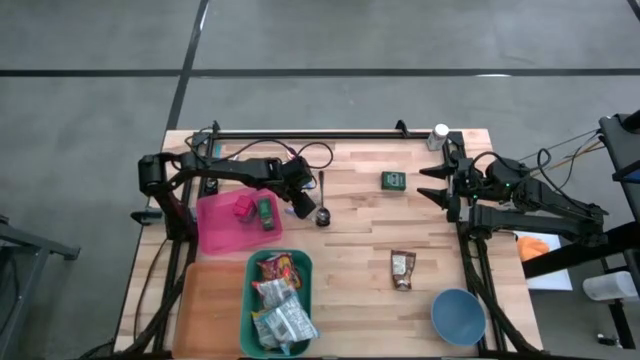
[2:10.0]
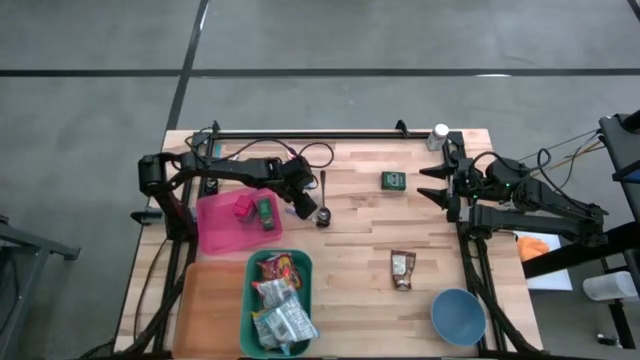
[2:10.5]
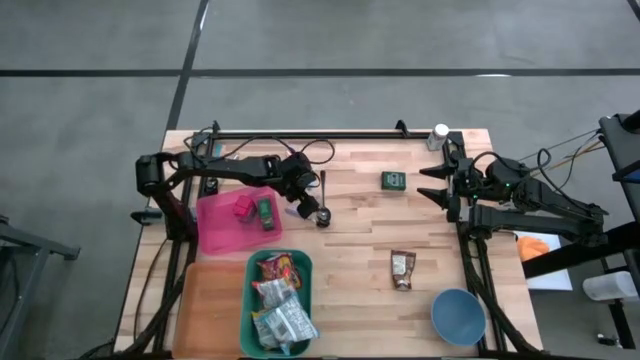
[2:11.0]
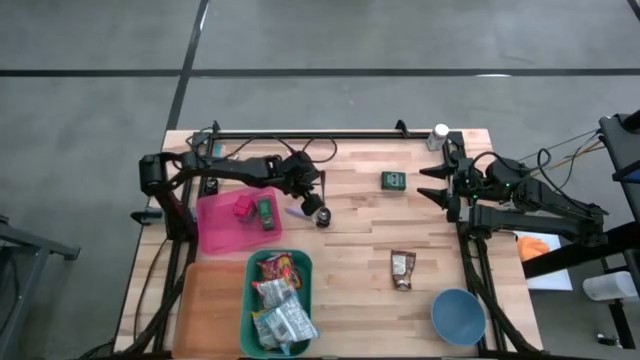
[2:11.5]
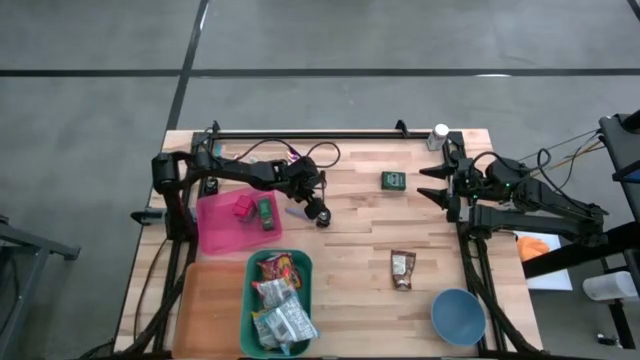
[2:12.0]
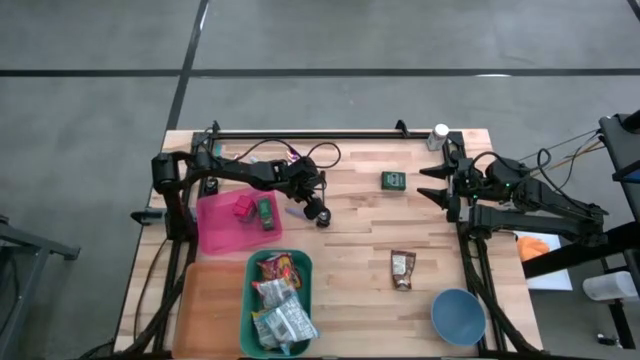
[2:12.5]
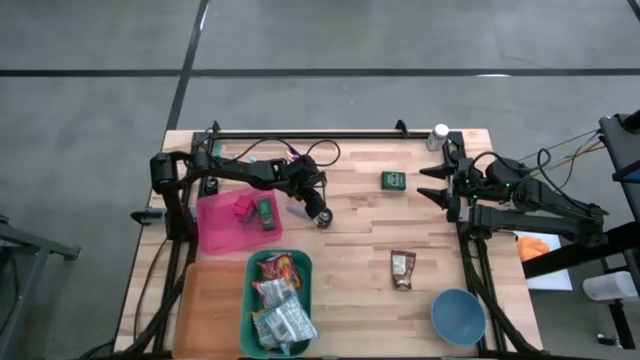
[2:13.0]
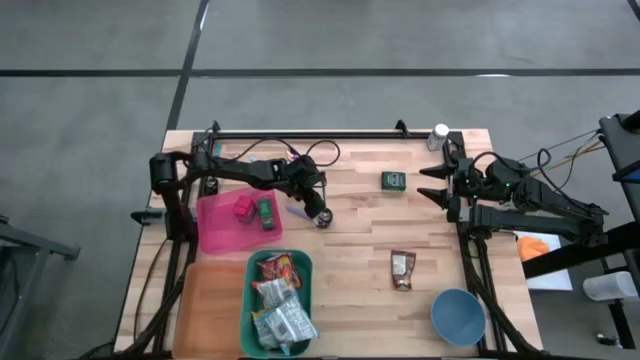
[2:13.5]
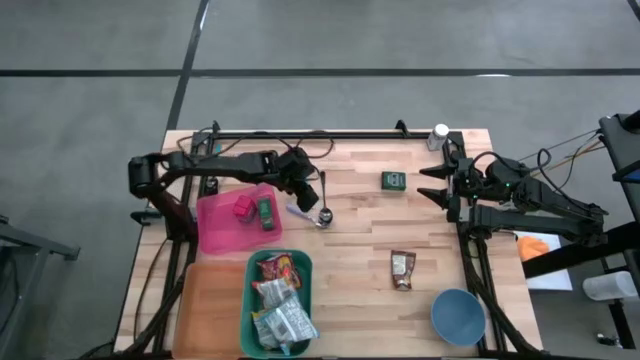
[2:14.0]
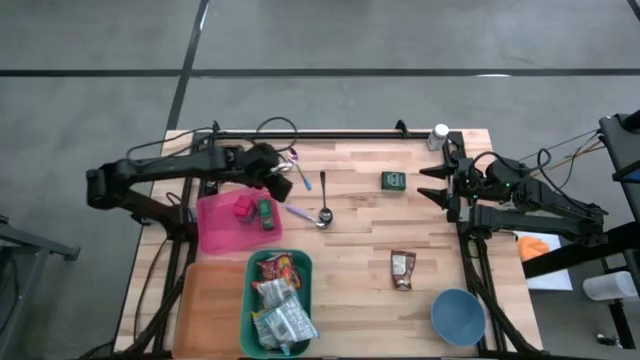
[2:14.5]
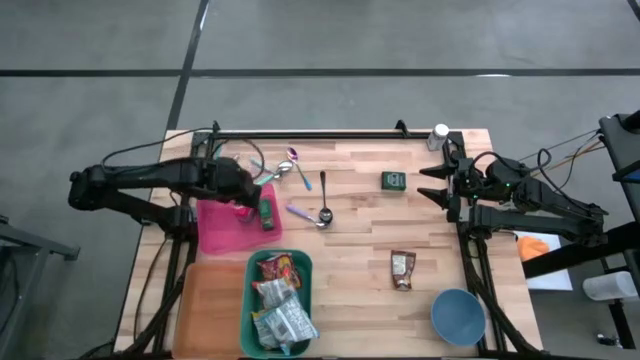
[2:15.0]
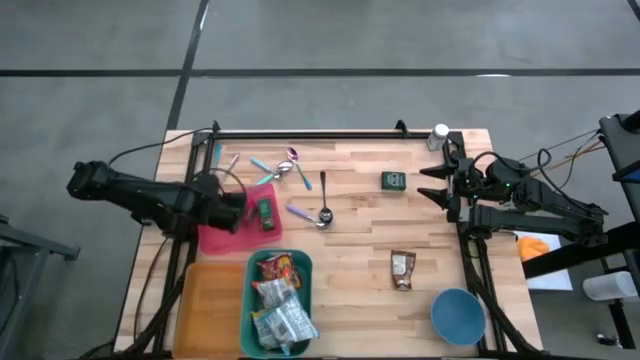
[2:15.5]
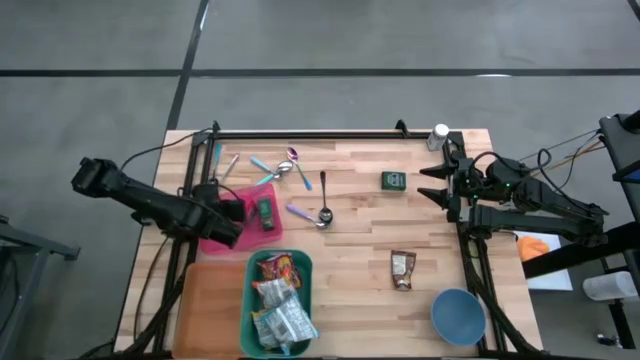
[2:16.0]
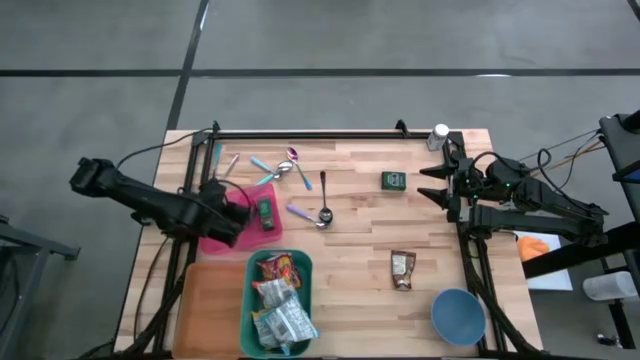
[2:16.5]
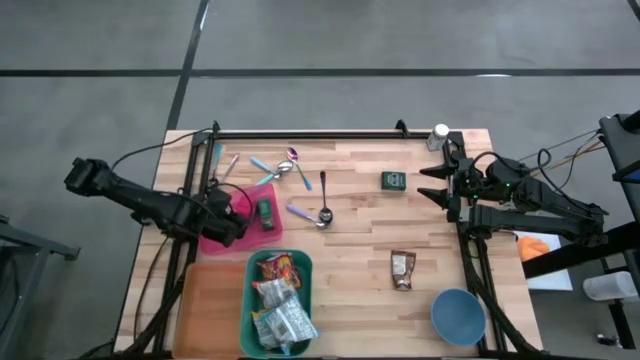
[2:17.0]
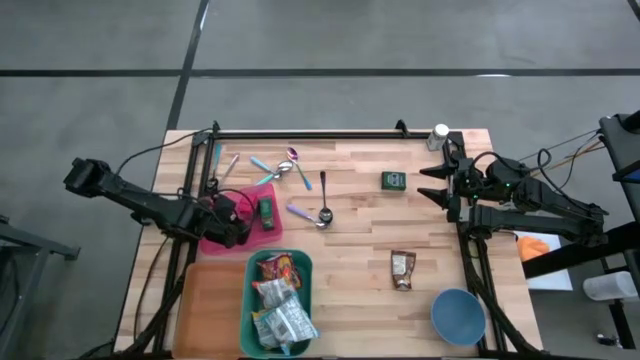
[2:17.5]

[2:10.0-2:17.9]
Put the brown seasoning bottle into the pink bin
